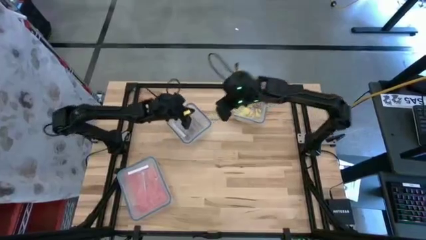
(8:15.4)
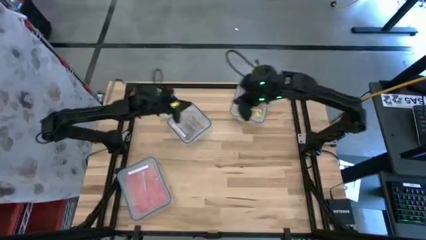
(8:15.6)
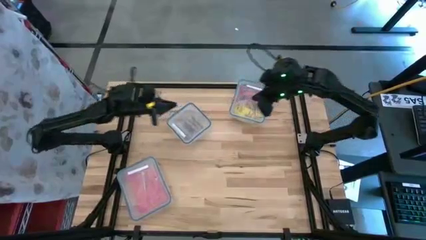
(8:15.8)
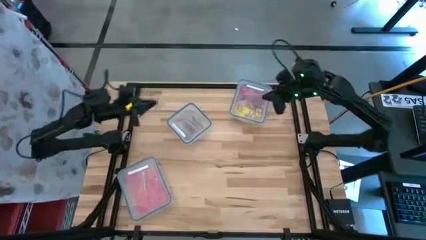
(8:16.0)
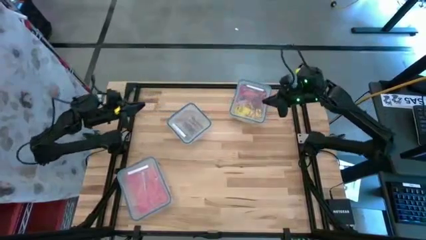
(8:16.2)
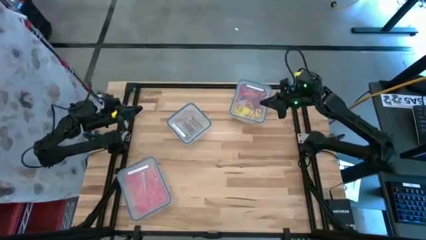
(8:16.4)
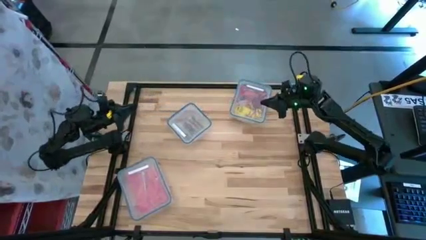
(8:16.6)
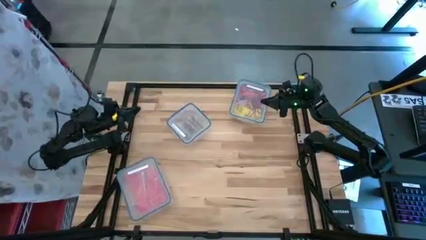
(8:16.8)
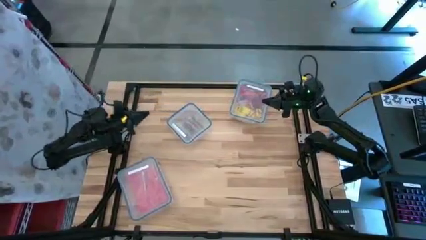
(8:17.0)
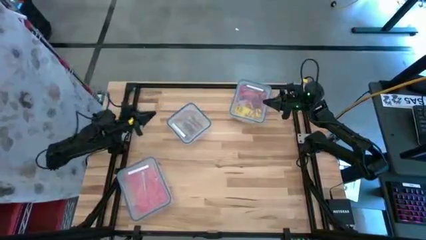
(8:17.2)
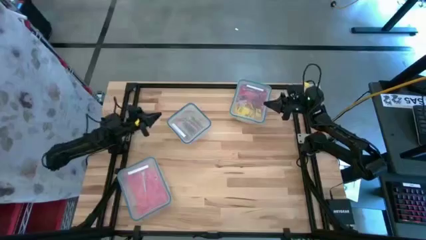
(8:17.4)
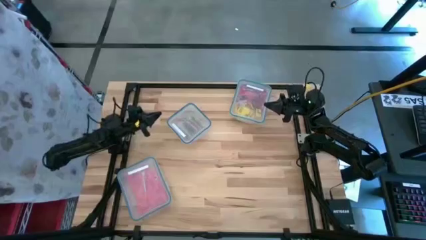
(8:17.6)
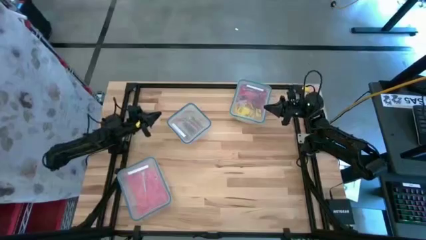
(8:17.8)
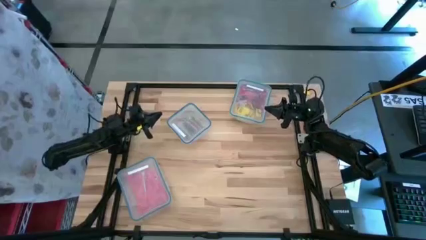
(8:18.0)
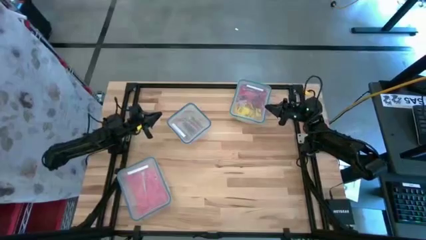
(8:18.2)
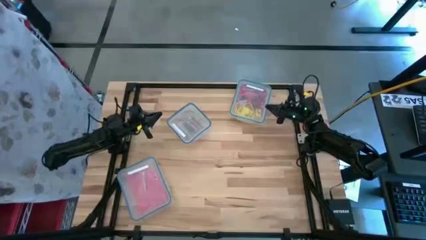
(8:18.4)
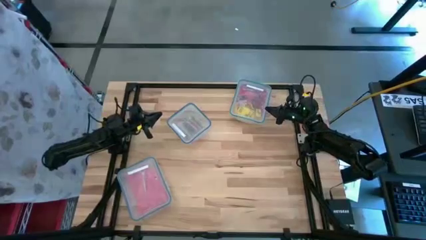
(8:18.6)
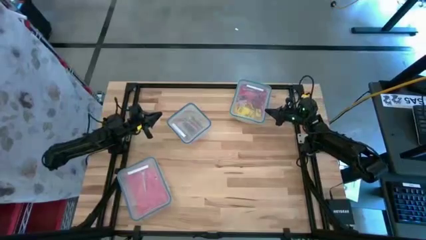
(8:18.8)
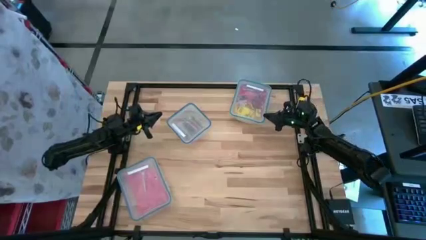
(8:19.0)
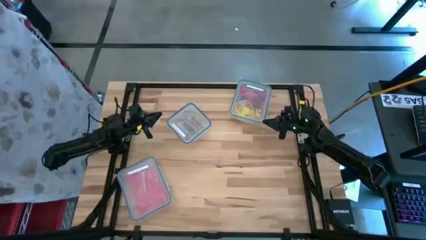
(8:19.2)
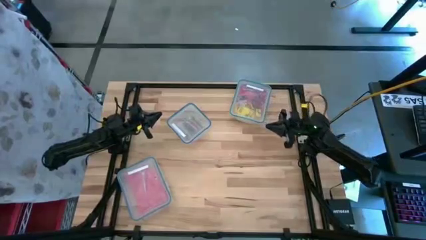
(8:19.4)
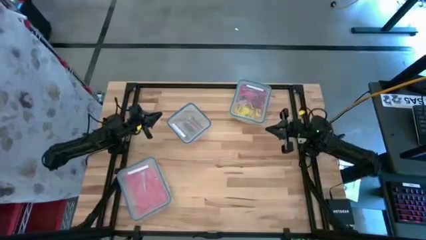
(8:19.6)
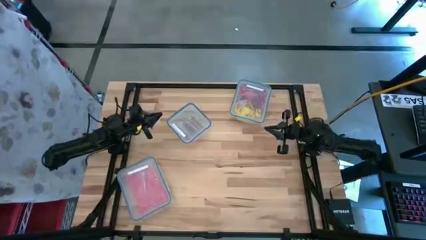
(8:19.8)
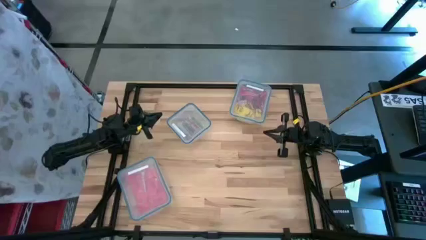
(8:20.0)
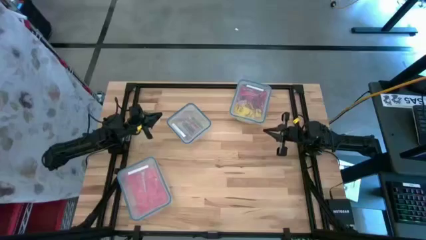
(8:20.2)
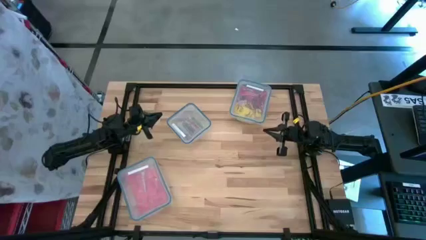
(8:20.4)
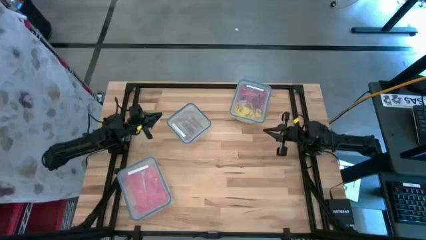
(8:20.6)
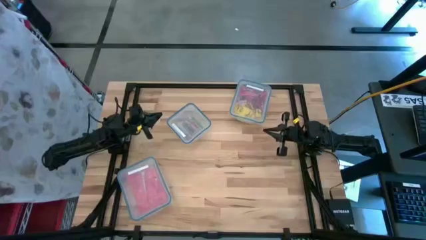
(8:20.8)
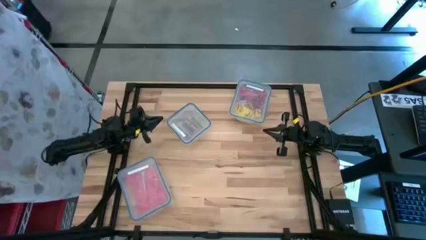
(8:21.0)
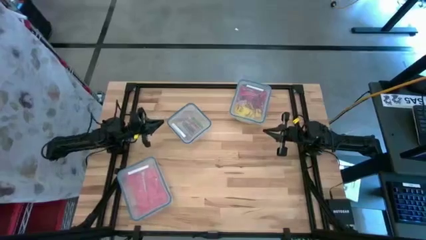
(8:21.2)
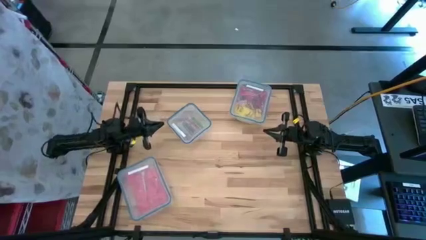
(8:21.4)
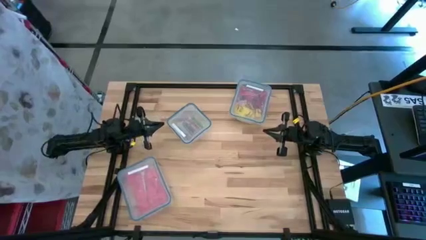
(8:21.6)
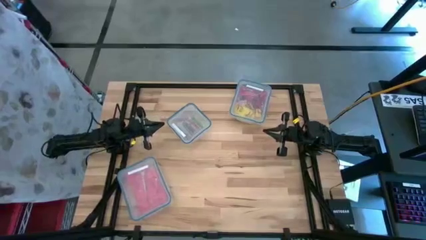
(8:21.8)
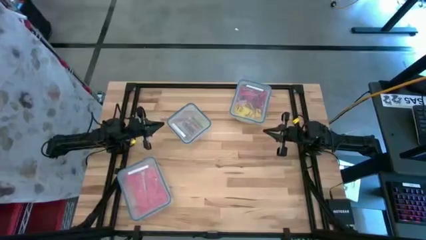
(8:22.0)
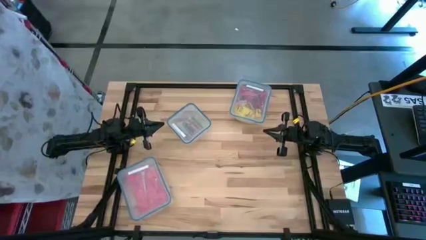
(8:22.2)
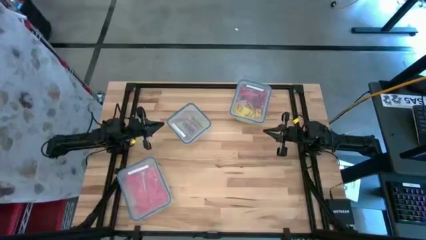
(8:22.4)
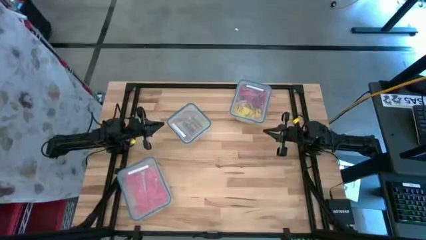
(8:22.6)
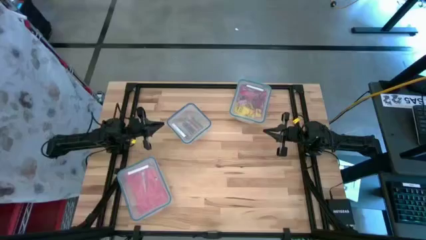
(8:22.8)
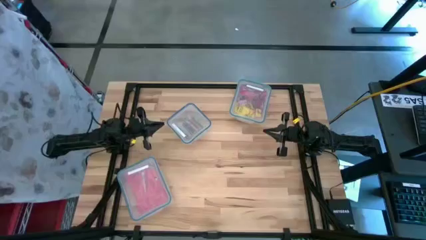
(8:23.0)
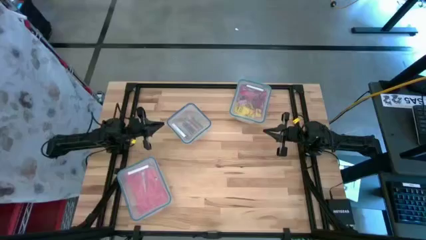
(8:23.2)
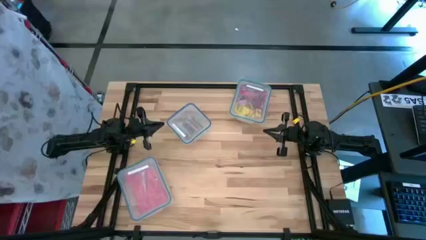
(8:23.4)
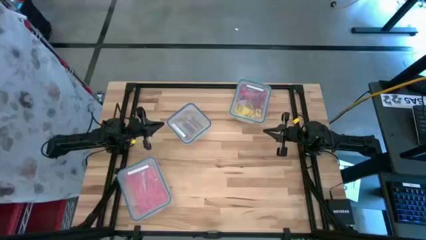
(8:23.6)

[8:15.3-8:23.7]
Task: Sort candy
Return to Home Position

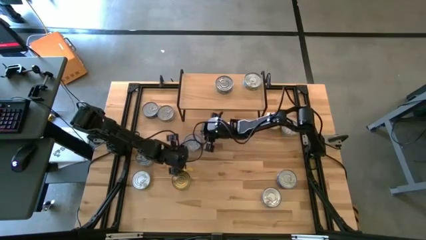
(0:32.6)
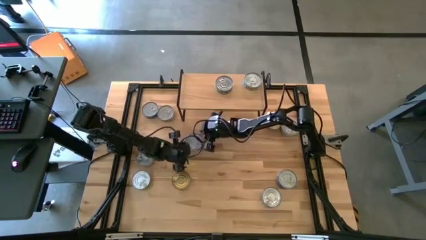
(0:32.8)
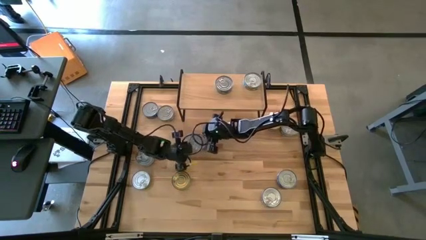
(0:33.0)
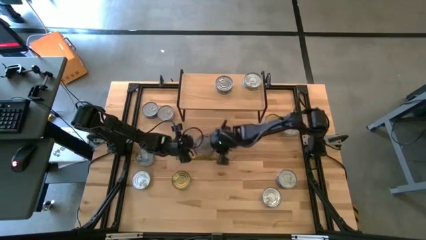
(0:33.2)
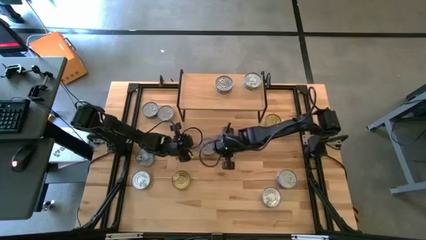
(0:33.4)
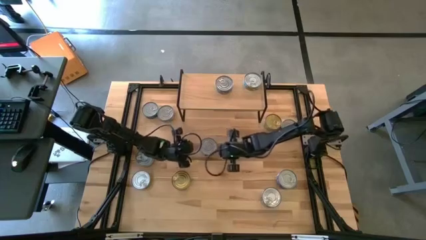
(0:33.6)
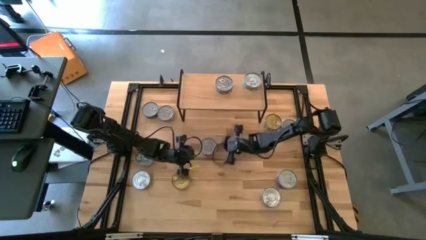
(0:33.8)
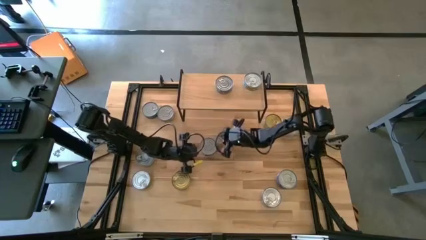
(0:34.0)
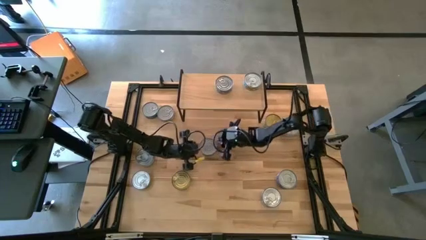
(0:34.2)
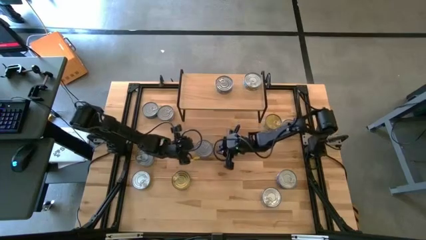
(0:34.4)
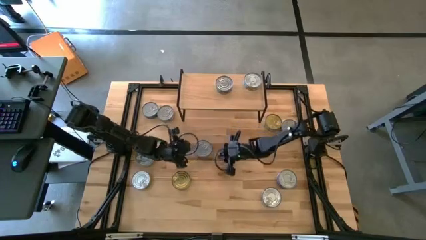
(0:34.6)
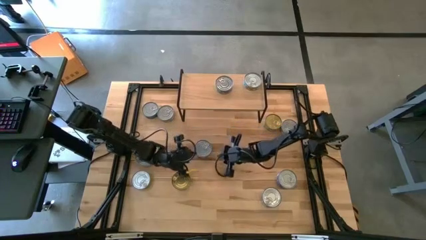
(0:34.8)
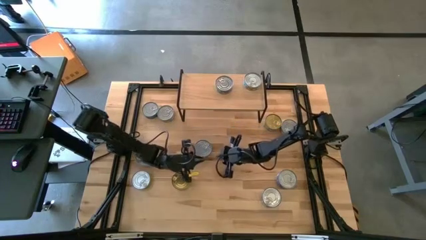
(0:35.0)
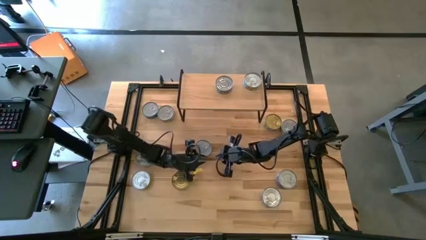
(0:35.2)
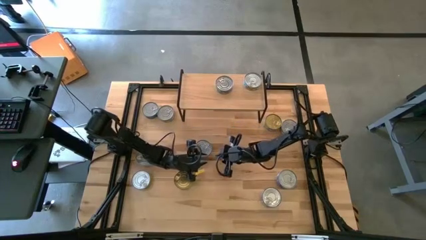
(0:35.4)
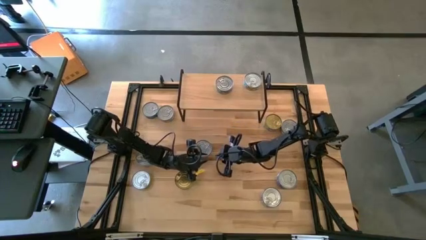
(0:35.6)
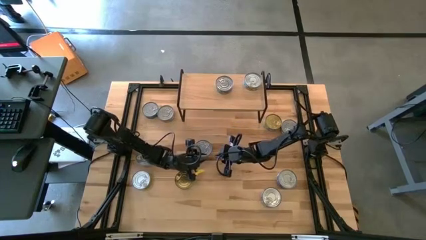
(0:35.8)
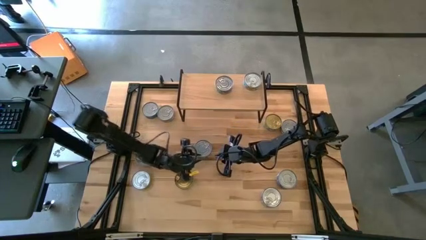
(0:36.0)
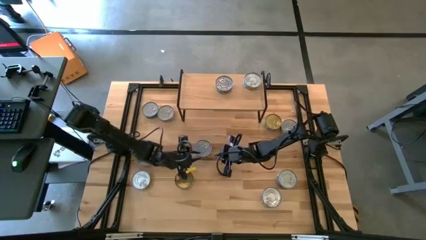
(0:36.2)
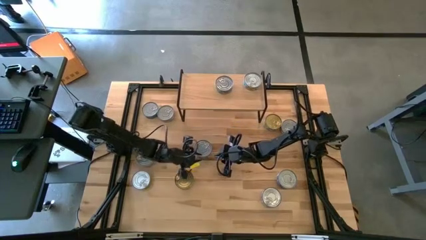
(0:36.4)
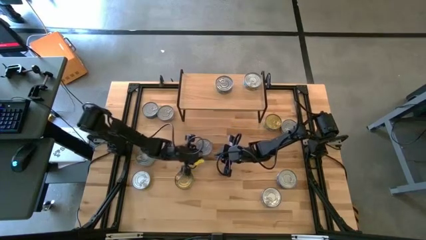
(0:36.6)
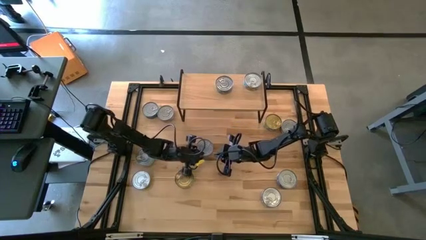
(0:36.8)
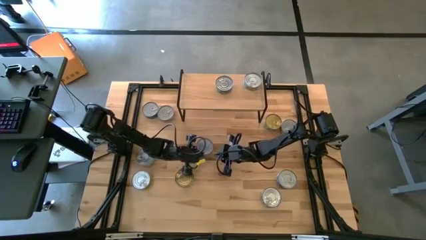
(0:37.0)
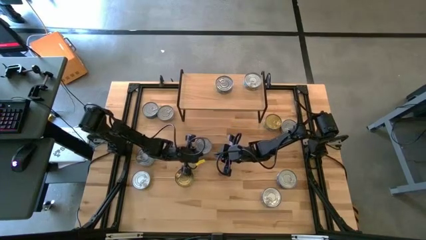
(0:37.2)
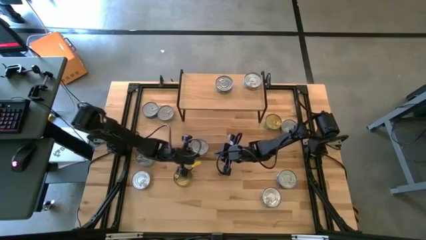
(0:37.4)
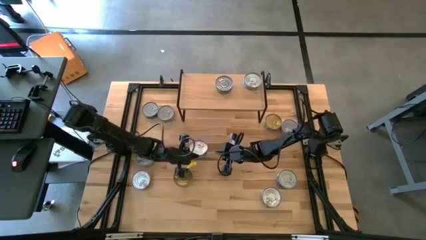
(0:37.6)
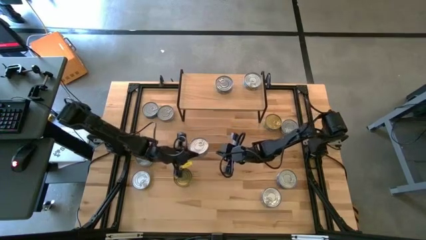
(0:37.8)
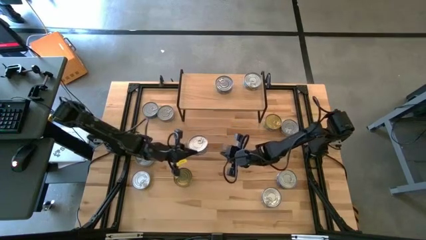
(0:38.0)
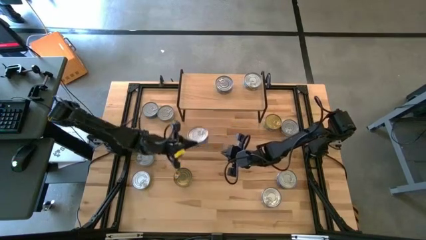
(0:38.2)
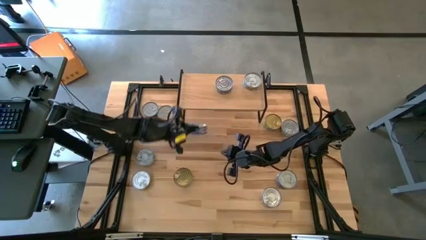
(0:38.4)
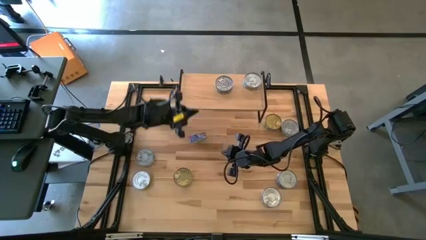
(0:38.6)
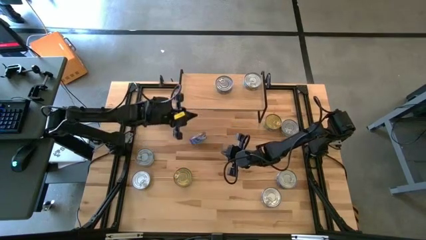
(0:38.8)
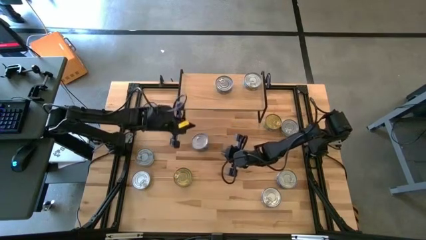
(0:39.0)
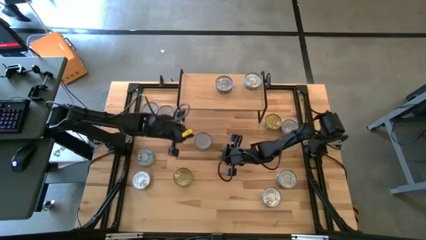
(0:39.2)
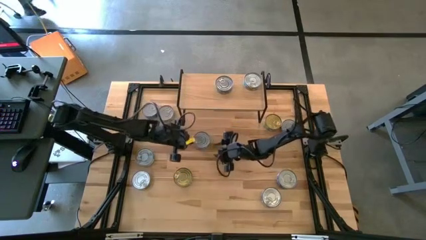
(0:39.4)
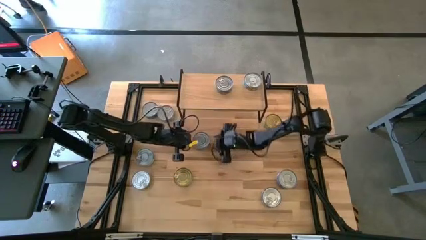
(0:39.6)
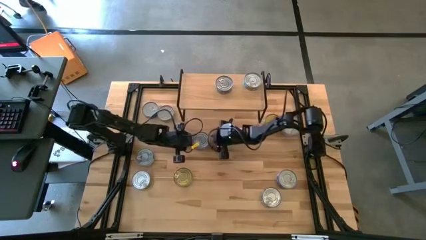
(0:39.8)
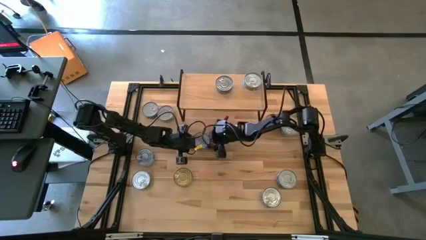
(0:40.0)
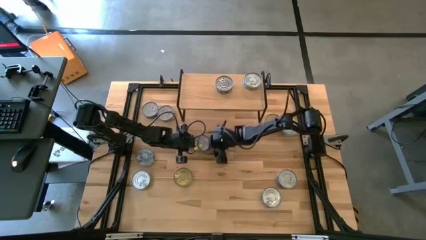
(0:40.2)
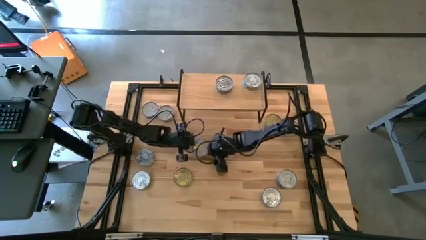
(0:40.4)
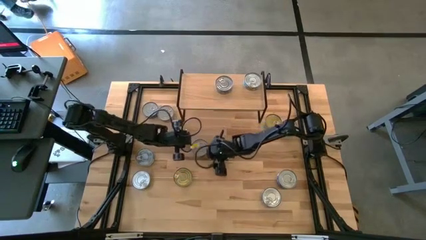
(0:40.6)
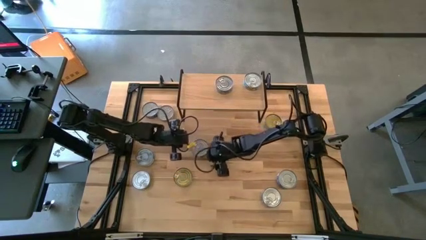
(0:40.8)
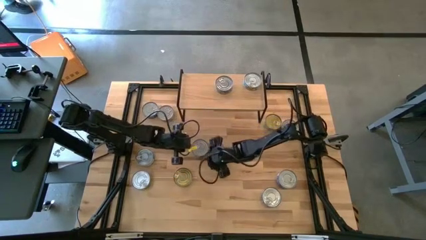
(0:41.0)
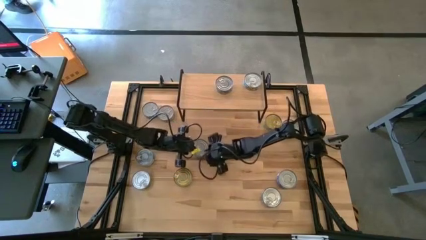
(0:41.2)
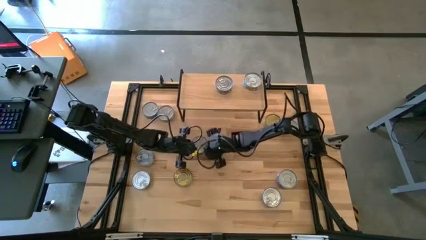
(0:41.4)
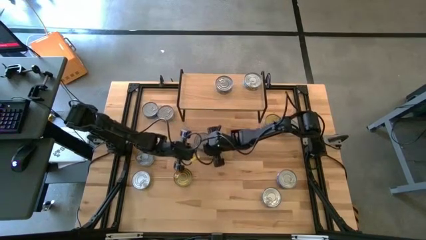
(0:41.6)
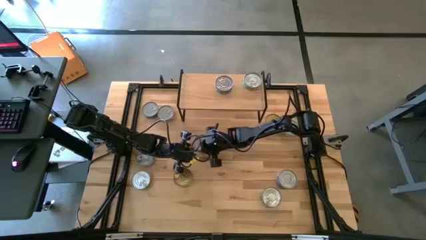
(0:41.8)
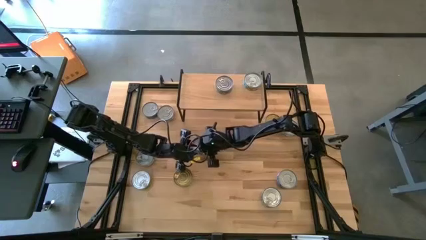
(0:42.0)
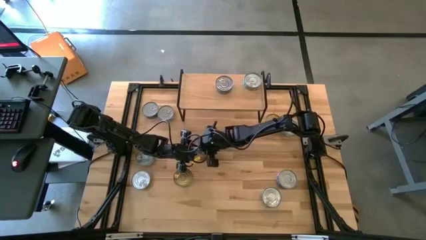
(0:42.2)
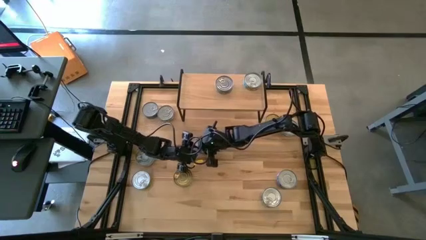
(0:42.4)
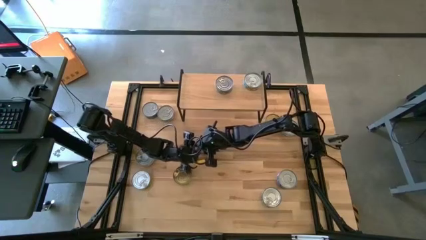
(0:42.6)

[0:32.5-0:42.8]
Task: Stack canned seafood by type on shelf
Put the blue tuna can on the shelf
